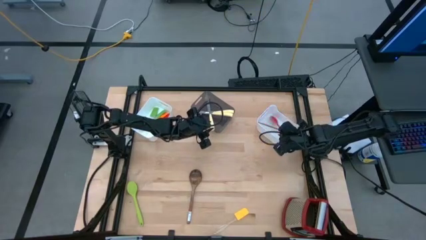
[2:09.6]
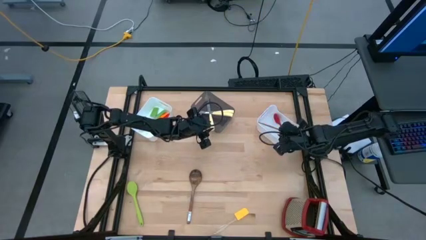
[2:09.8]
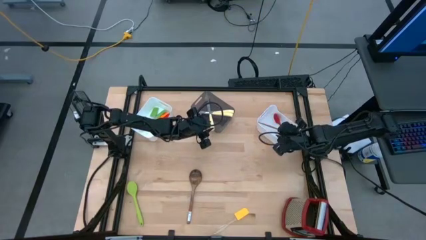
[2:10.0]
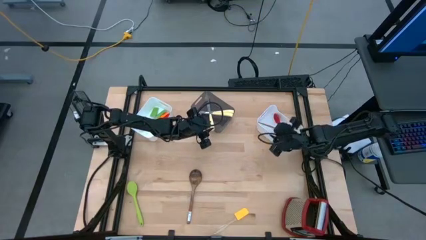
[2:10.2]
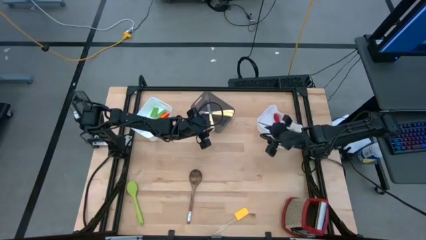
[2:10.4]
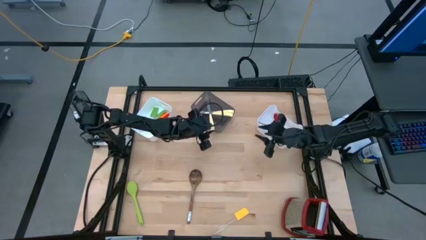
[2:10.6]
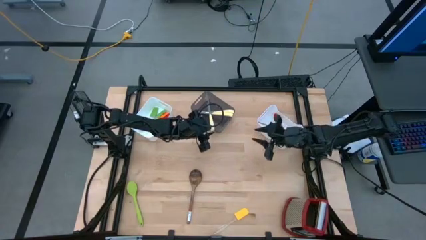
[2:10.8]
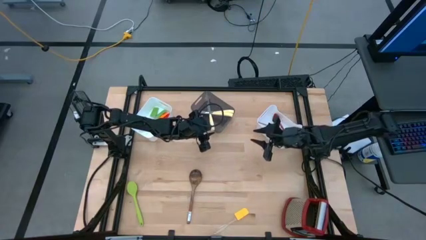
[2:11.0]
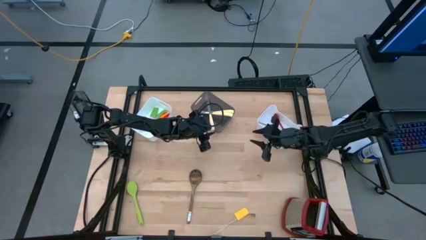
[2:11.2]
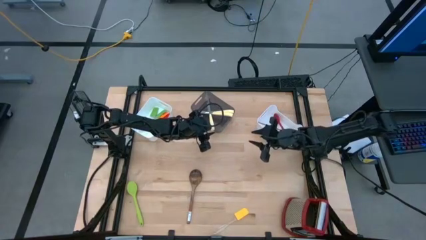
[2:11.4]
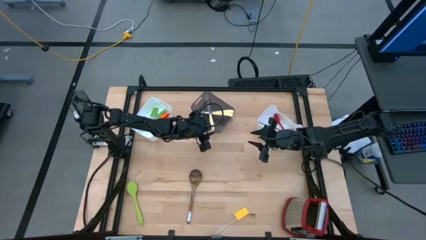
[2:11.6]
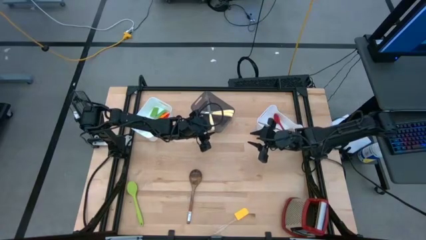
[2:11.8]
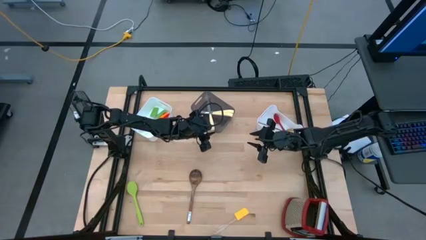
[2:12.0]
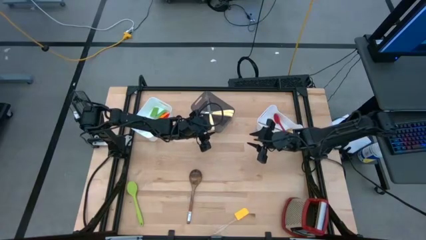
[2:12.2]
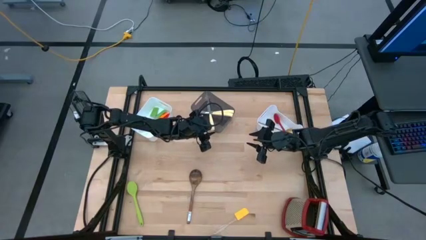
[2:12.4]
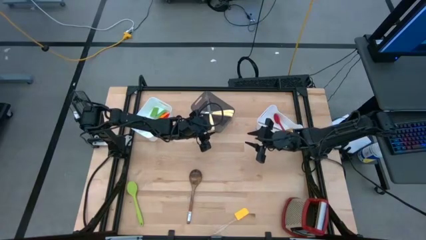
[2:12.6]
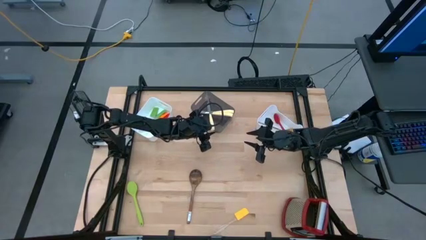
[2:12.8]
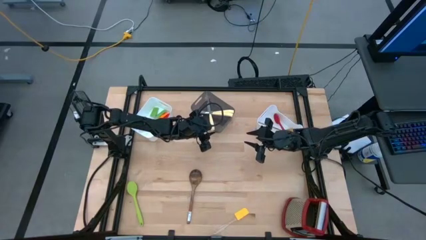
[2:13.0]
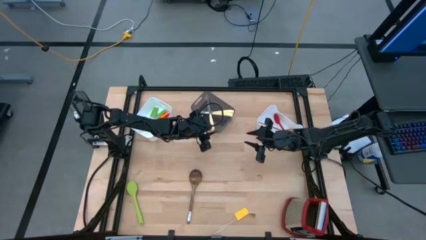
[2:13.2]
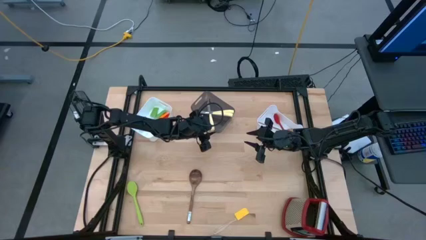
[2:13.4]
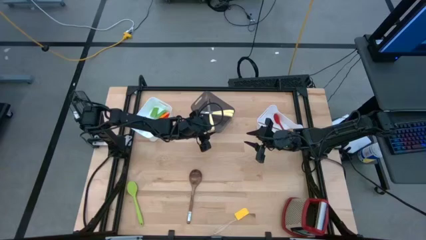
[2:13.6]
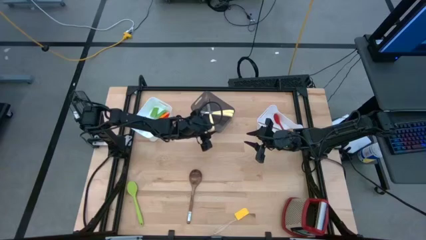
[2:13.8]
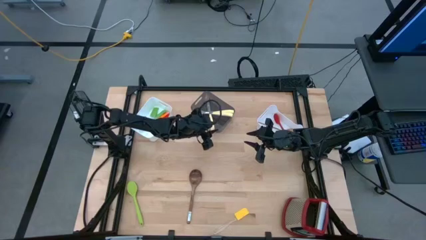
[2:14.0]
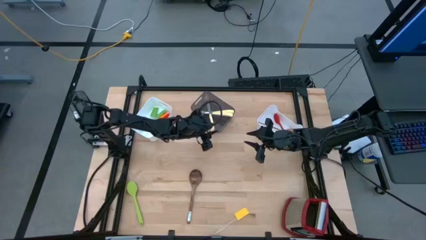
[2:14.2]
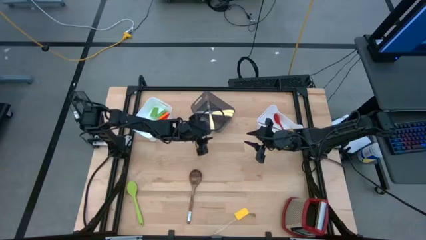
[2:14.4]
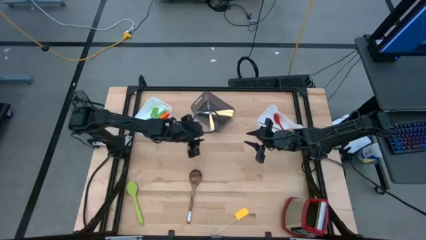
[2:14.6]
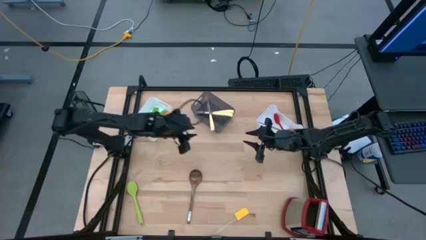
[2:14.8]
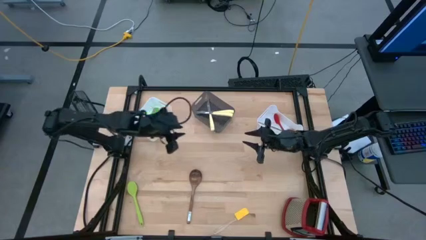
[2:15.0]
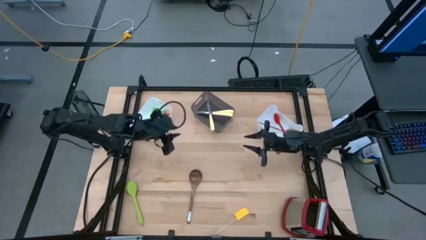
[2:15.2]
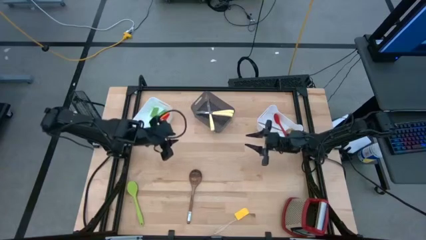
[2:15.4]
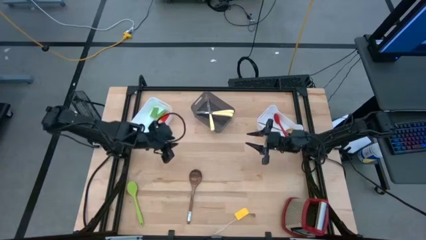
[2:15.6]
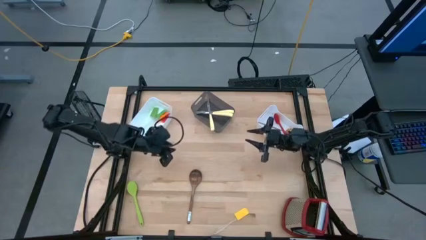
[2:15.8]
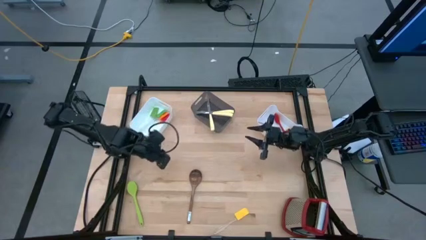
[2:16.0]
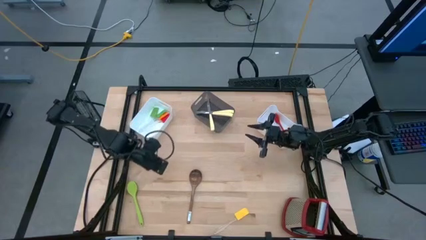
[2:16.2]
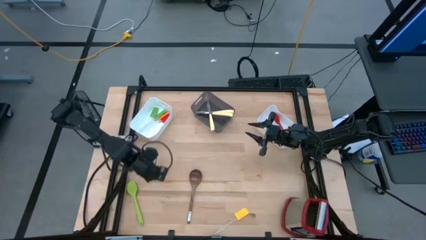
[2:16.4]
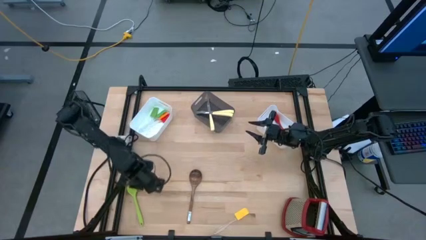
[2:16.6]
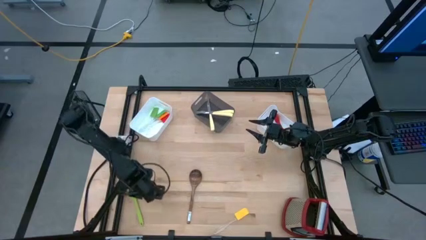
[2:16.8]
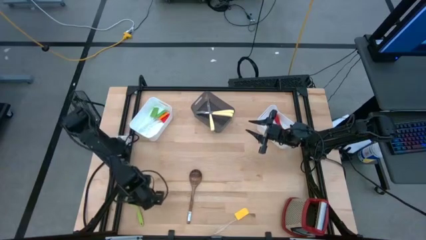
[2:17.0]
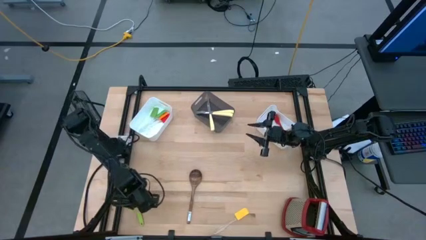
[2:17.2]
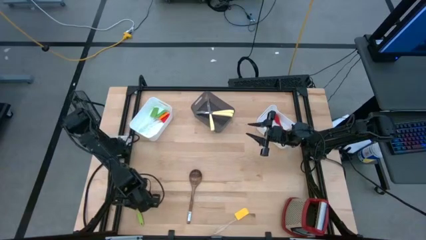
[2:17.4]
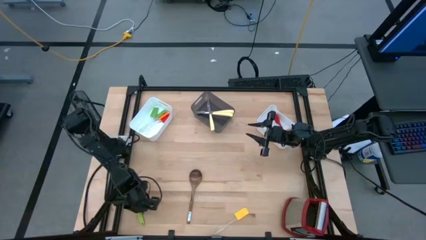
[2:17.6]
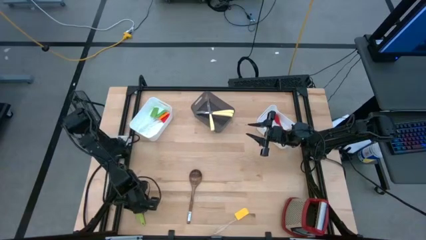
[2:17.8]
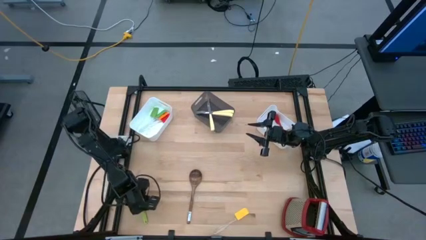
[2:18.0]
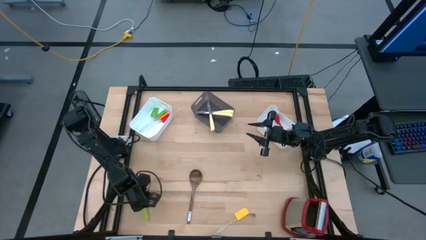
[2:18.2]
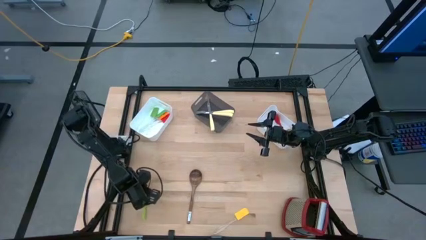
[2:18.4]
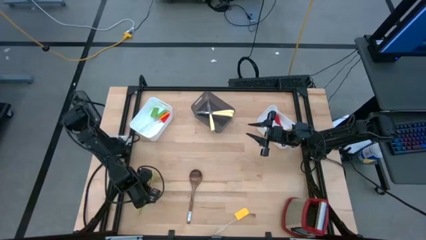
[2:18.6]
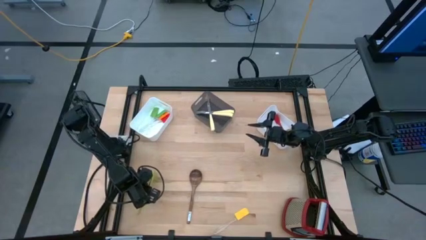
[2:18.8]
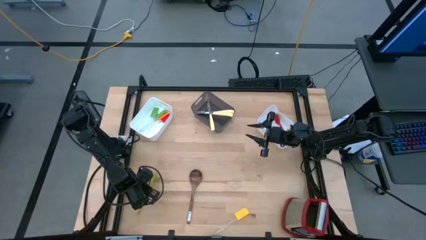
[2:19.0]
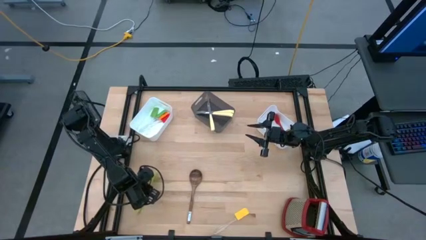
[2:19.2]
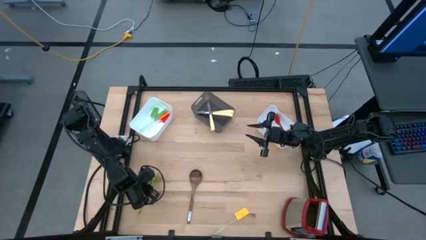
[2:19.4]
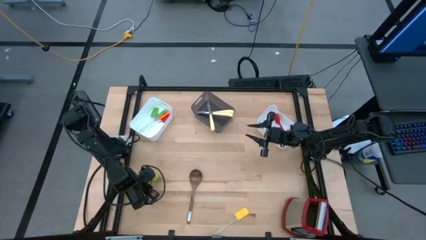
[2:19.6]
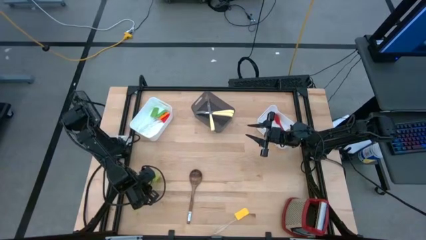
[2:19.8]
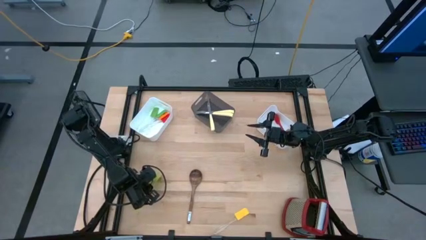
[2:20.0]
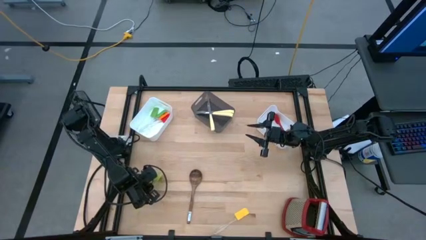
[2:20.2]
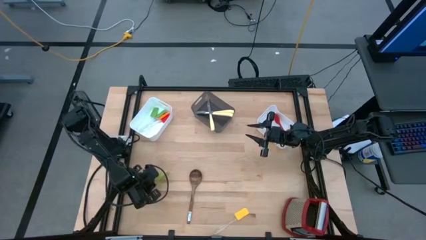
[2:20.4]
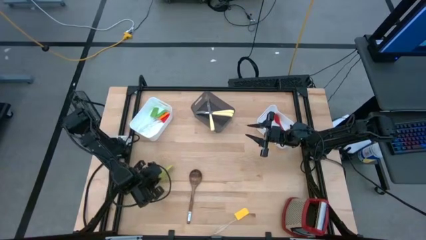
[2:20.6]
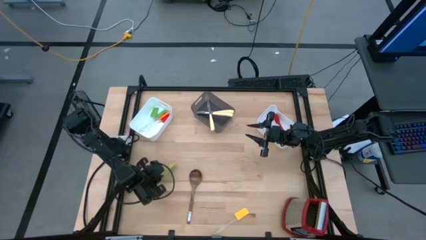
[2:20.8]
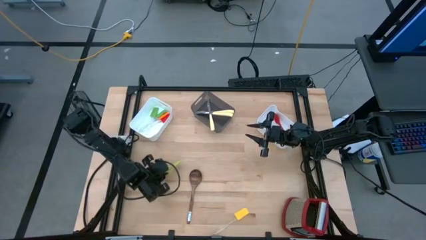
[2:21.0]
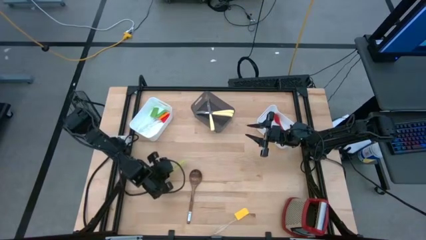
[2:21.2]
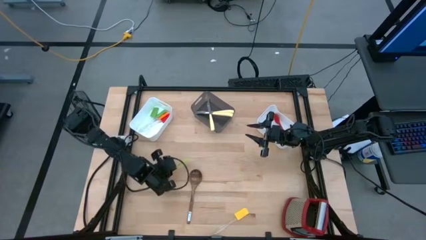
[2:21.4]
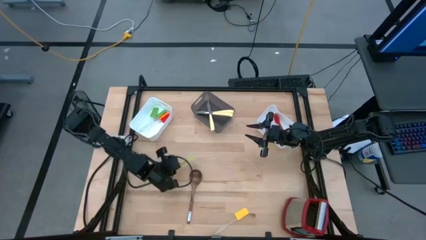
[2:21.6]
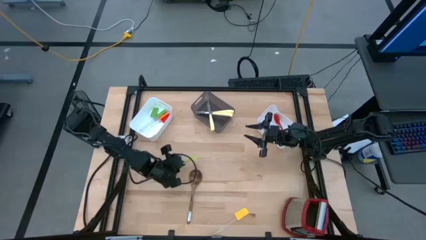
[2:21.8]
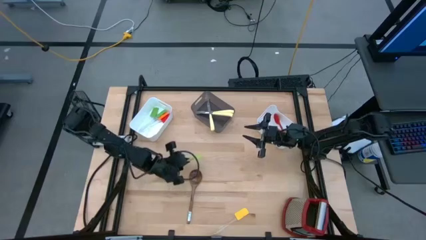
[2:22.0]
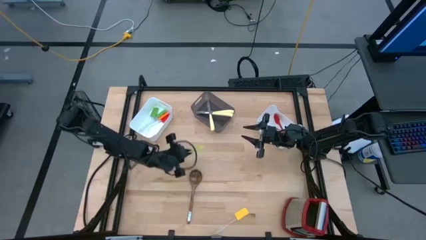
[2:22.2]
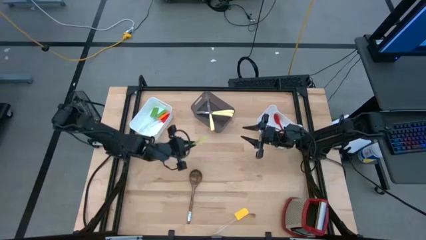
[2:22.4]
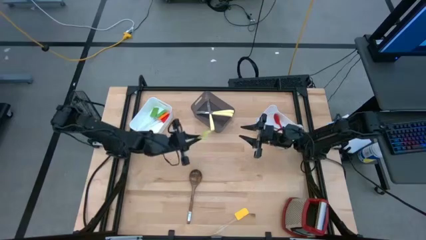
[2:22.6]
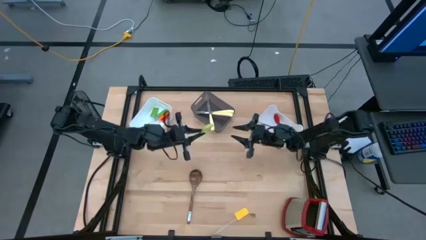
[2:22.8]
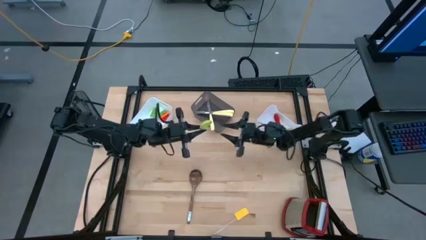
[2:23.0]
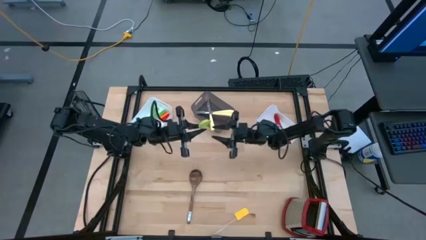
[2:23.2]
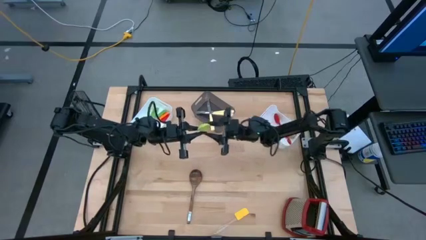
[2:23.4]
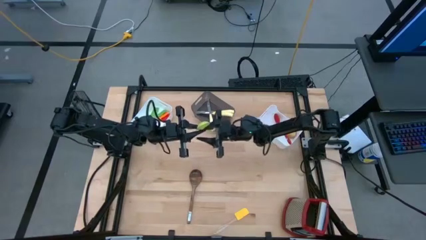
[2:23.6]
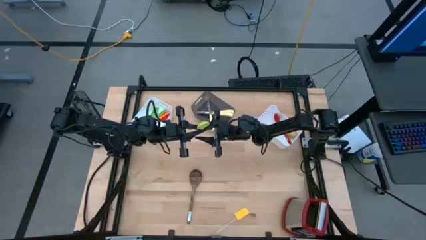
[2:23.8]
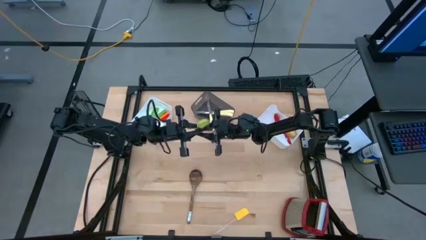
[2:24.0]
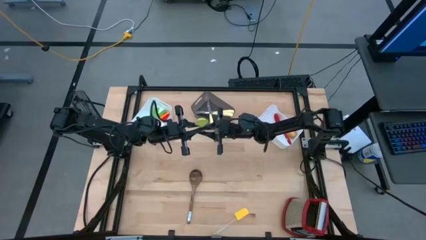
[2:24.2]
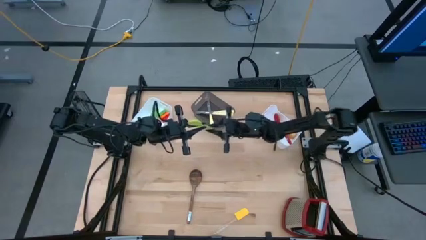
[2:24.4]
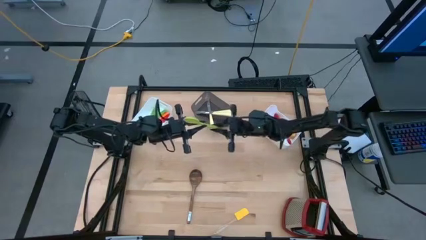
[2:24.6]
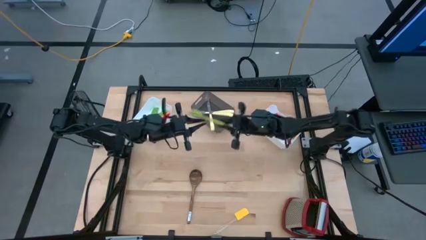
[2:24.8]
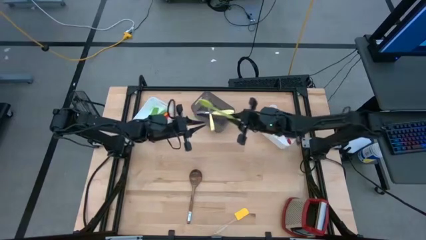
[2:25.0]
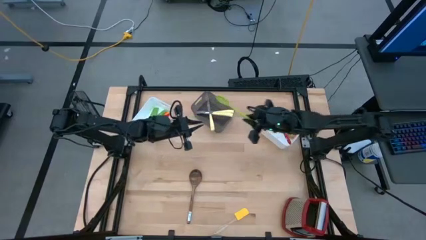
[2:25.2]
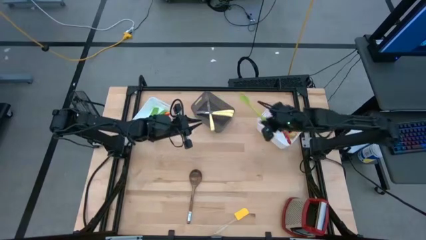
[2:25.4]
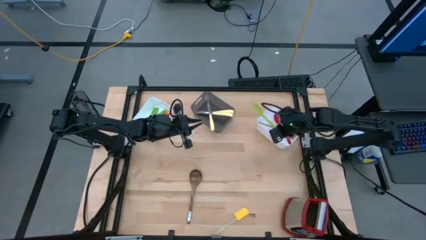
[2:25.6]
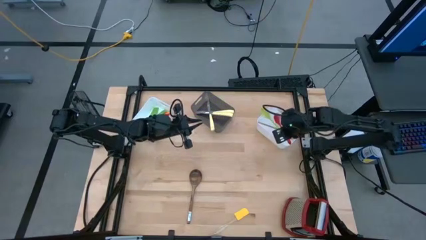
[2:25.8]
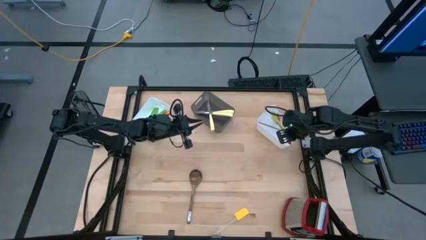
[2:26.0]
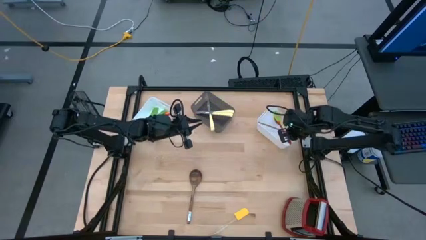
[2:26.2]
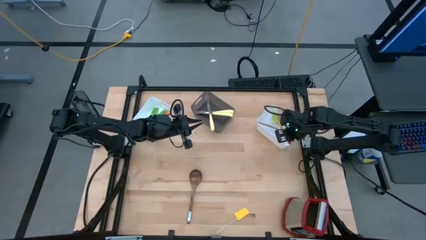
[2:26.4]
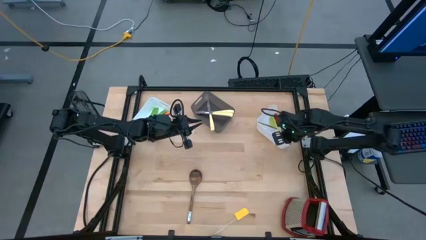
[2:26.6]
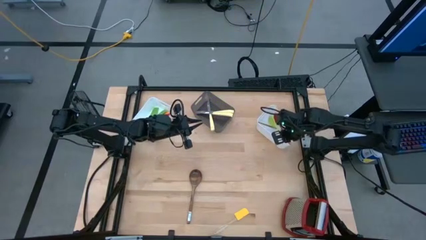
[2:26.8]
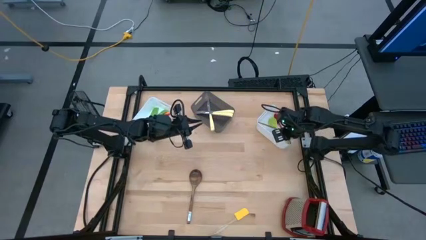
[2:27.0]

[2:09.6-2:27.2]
Task: Pick & Place Kitchen Items
Put the green serving spoon into the right white bin
